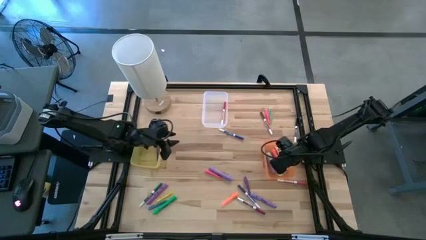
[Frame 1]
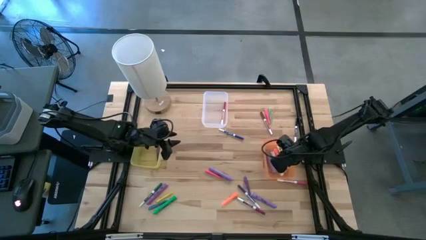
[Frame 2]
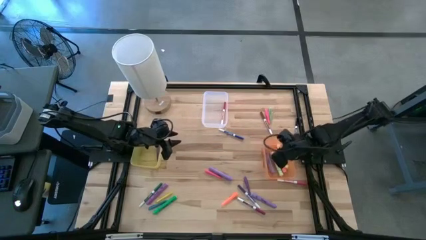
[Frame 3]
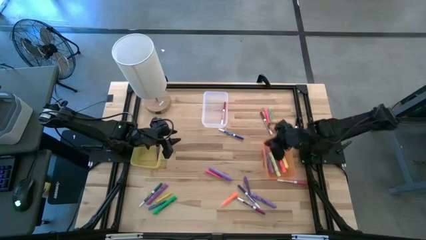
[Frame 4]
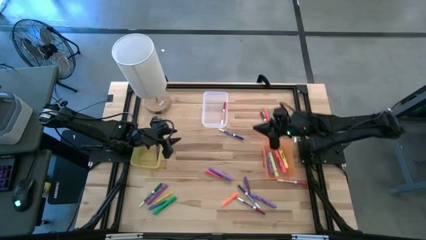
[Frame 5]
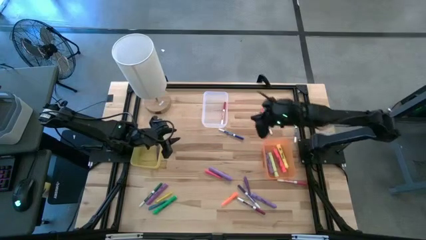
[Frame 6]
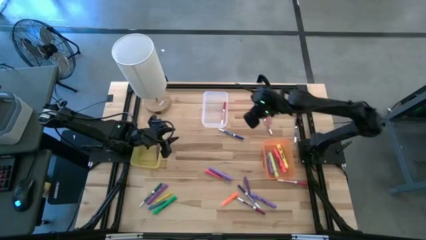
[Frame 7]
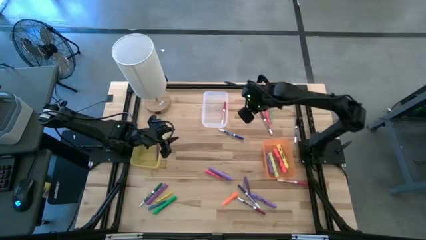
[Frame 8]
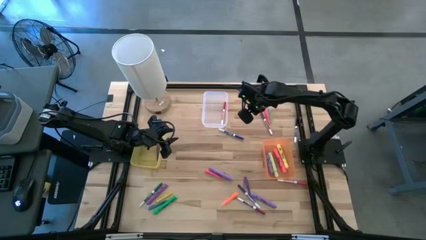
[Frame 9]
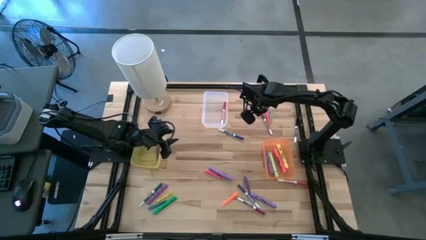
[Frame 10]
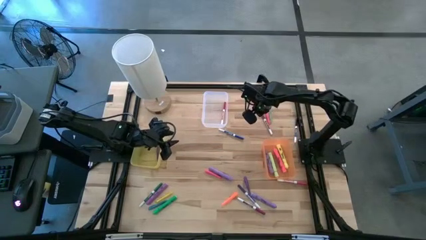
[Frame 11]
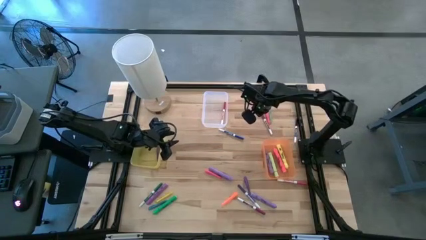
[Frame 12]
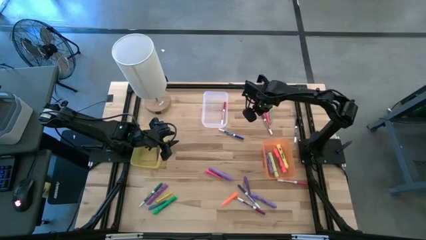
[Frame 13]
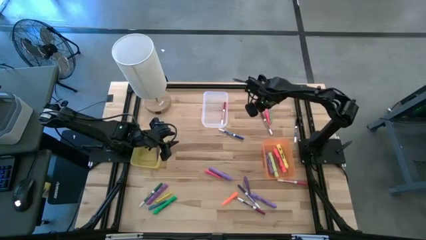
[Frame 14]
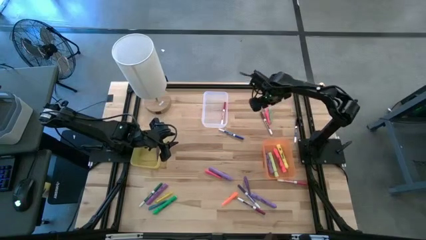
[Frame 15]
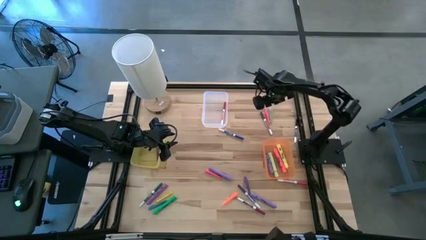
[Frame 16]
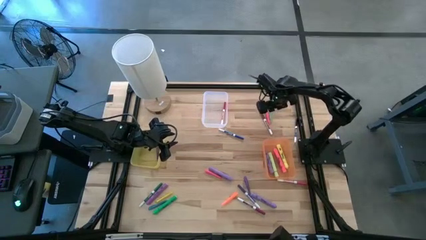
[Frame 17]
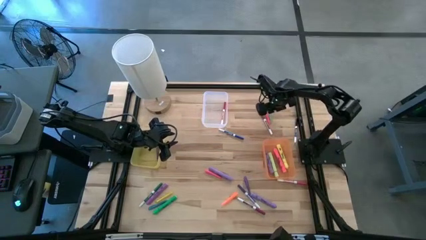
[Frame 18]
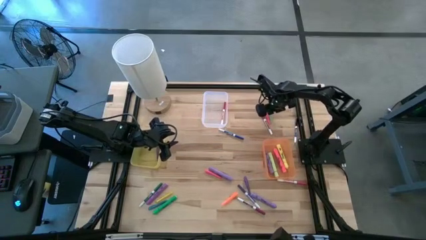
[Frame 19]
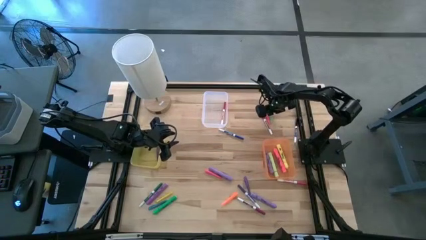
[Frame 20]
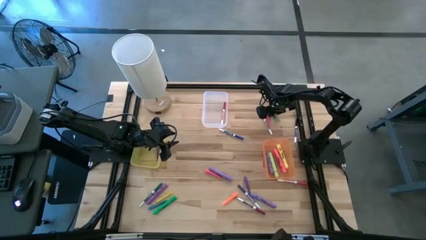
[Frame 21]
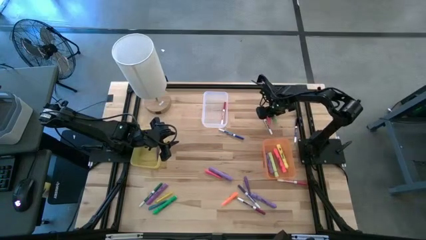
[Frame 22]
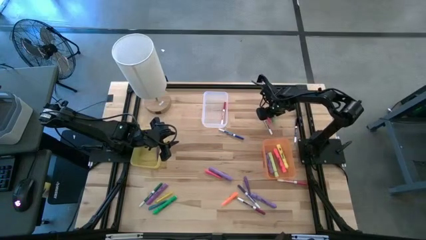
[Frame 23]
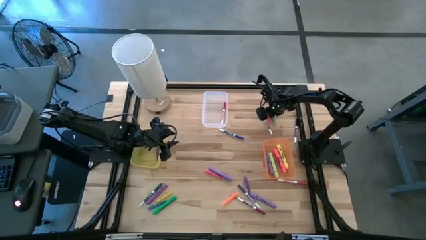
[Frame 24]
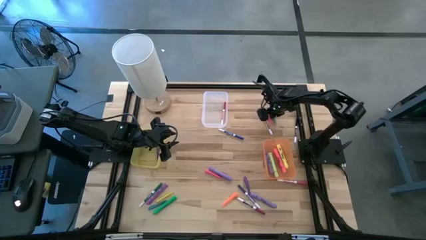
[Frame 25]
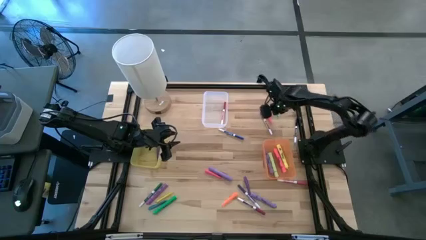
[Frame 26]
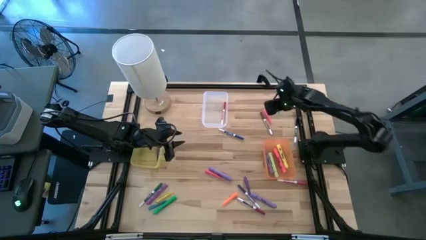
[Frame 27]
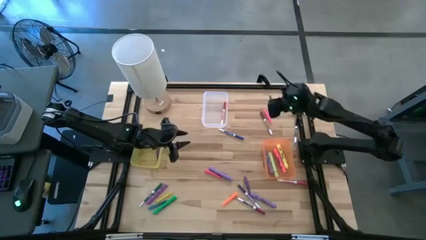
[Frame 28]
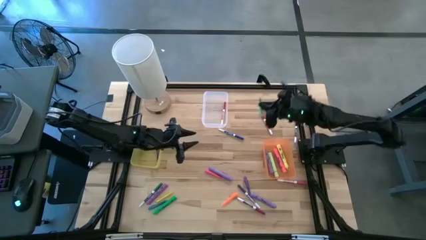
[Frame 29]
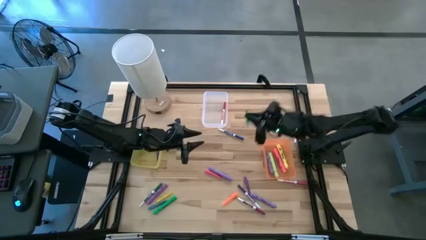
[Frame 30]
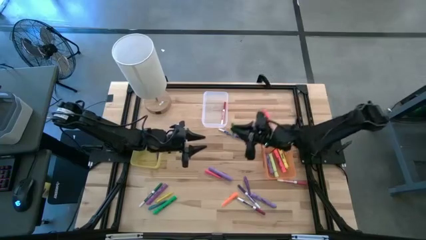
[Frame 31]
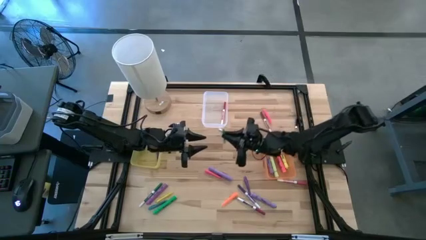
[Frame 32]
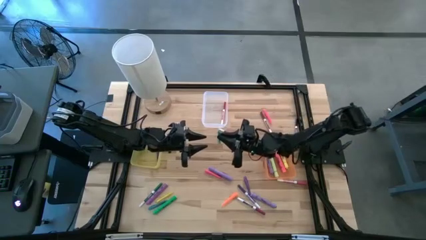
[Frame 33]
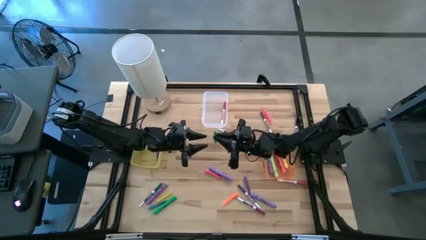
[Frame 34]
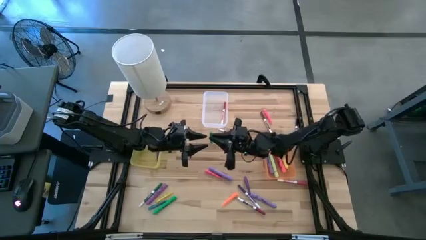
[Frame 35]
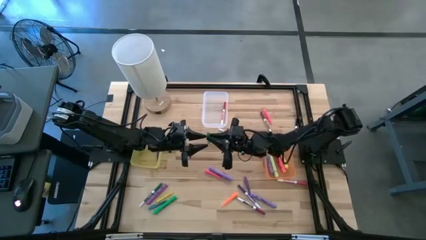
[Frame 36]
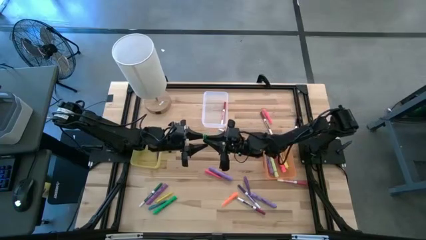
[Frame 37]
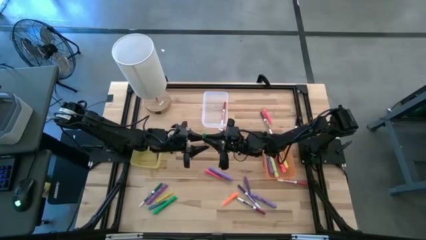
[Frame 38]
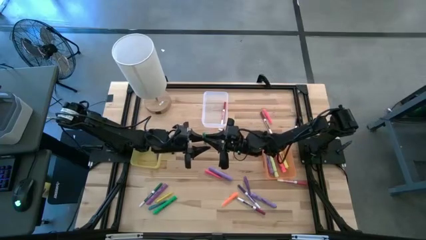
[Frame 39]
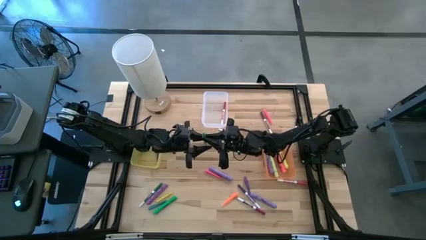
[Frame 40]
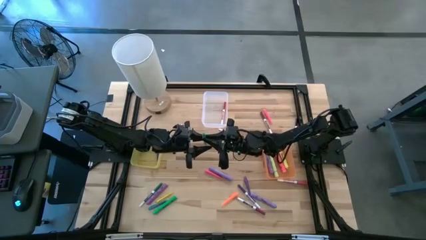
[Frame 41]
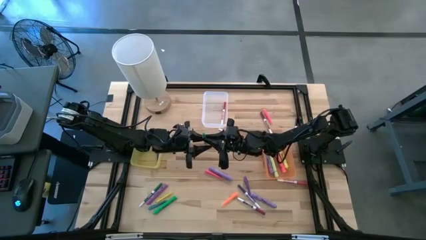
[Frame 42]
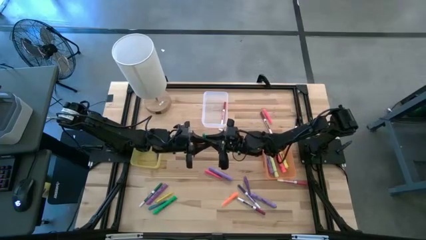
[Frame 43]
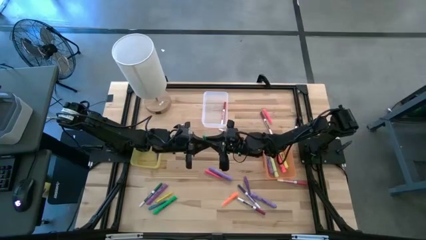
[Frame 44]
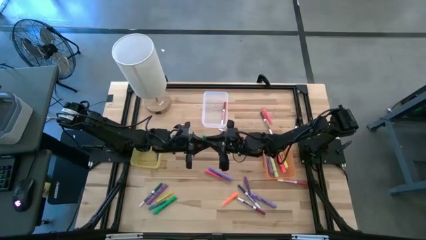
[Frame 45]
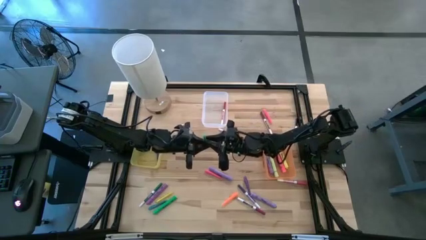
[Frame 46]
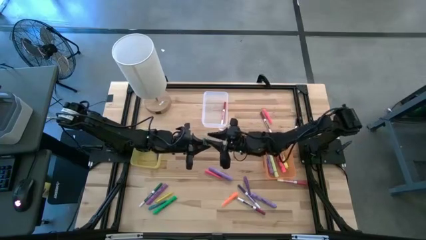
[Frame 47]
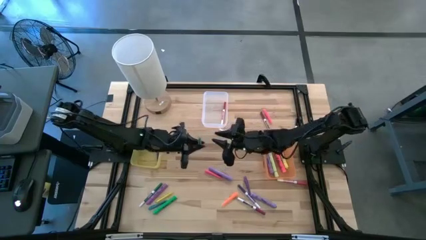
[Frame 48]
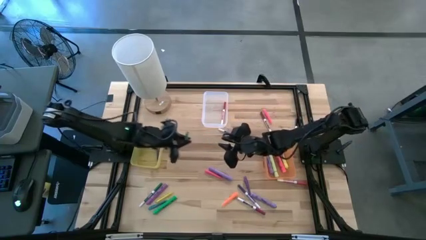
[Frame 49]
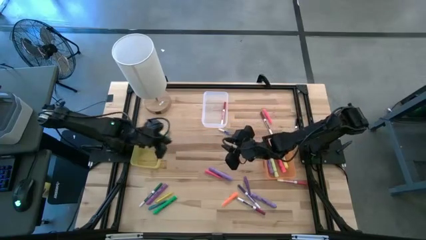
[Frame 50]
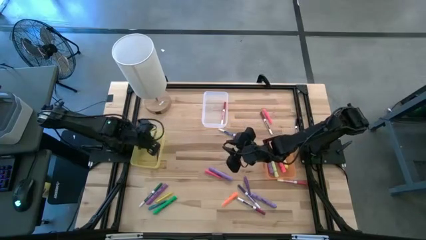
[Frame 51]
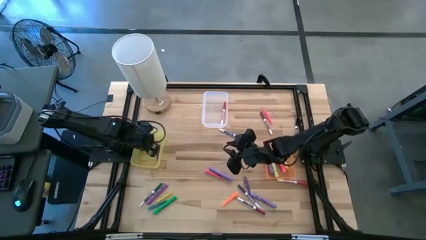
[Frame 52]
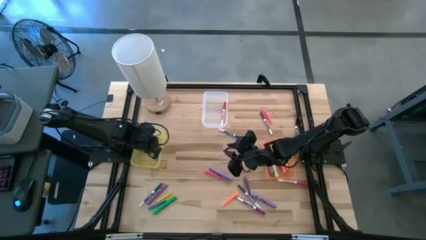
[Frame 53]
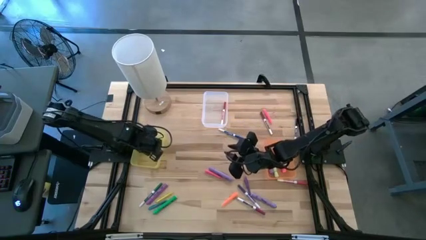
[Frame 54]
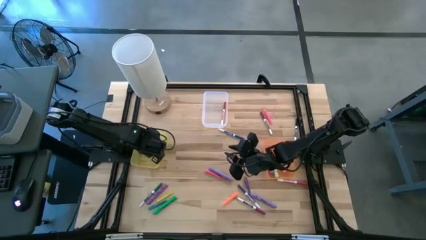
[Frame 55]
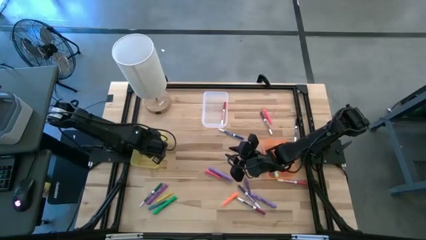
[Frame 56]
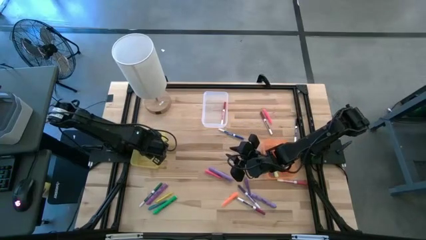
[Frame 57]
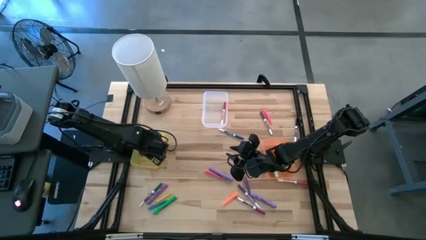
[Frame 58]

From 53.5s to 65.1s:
Task: Pick & Place Markers
Put the green pen into the yellow bin

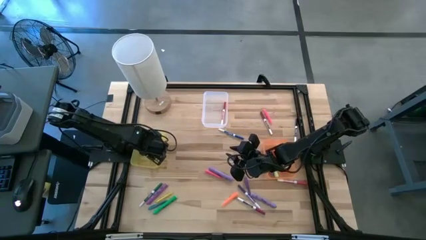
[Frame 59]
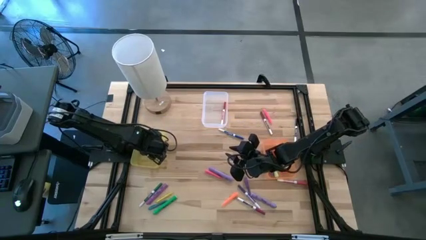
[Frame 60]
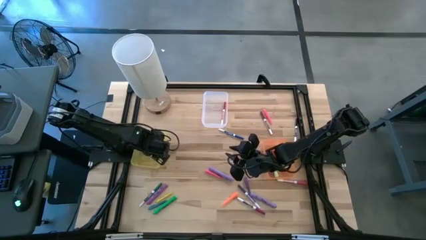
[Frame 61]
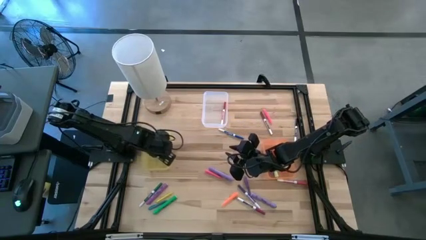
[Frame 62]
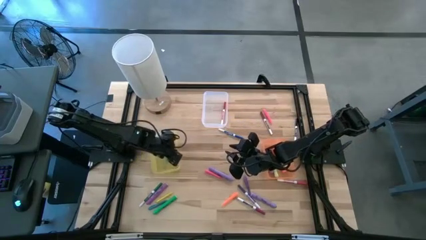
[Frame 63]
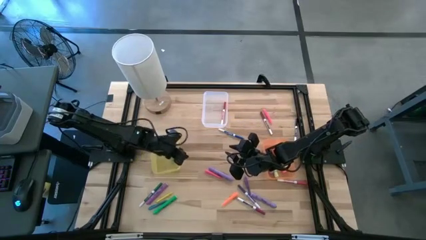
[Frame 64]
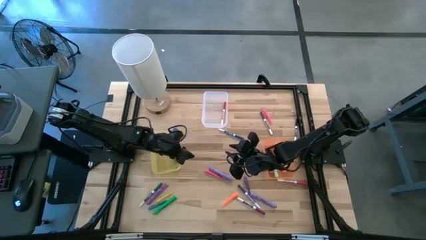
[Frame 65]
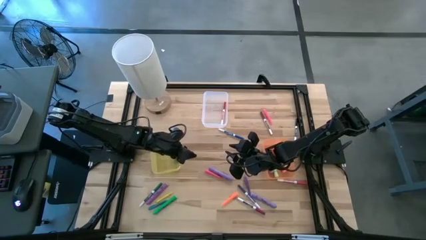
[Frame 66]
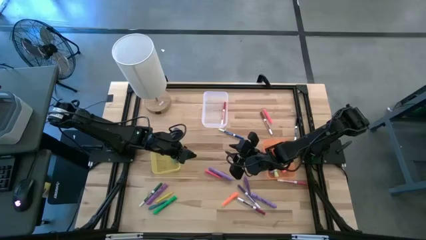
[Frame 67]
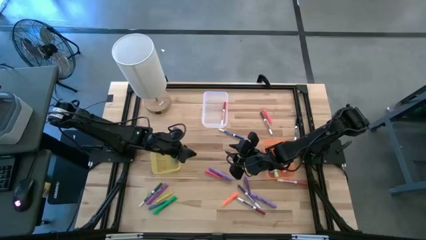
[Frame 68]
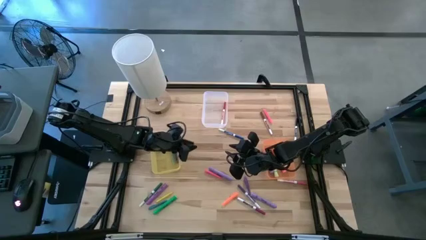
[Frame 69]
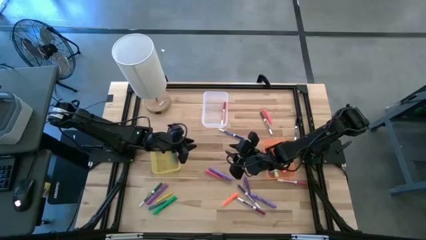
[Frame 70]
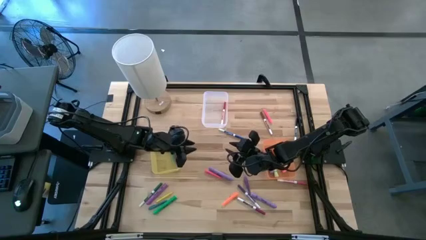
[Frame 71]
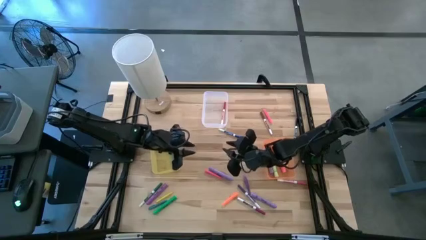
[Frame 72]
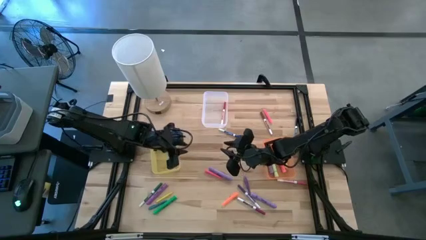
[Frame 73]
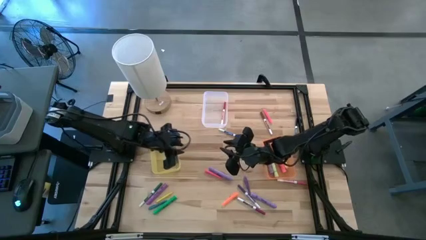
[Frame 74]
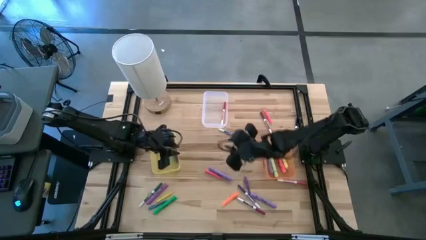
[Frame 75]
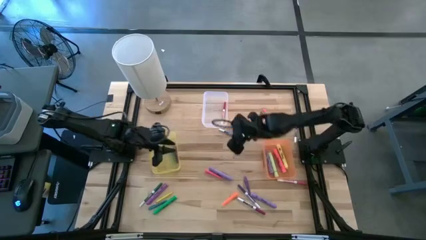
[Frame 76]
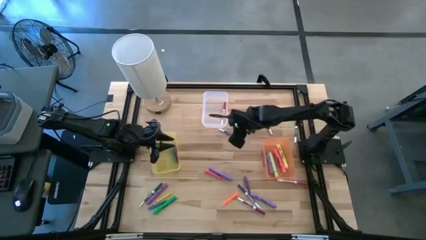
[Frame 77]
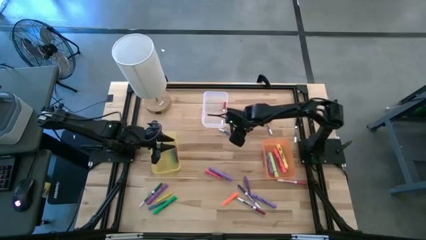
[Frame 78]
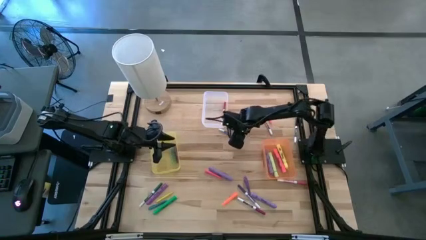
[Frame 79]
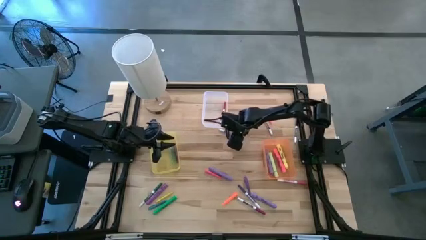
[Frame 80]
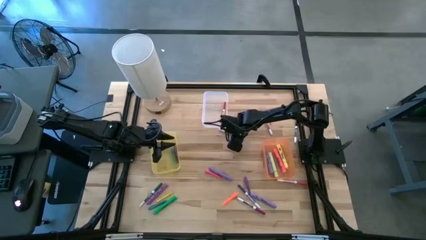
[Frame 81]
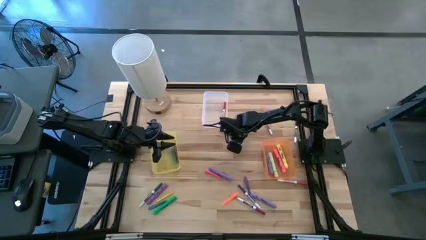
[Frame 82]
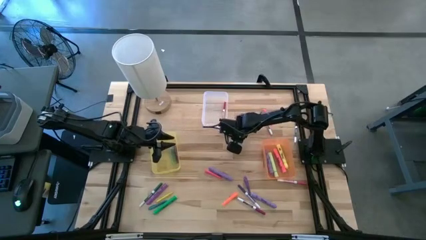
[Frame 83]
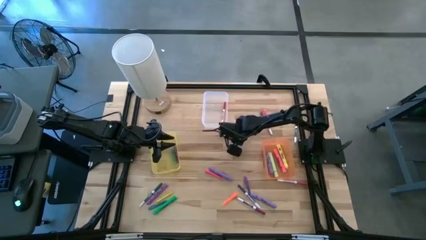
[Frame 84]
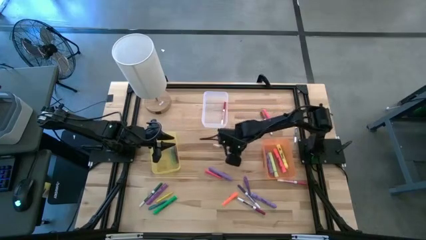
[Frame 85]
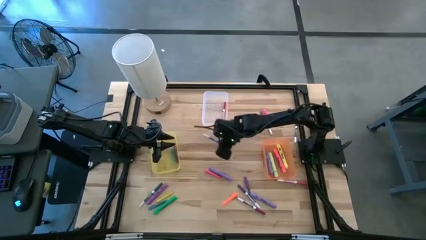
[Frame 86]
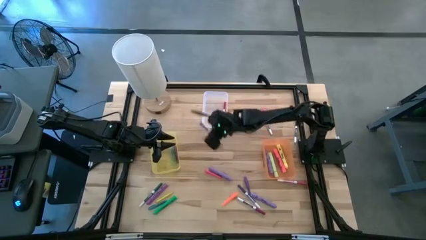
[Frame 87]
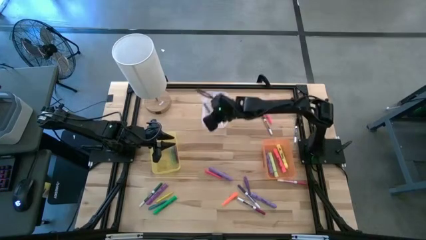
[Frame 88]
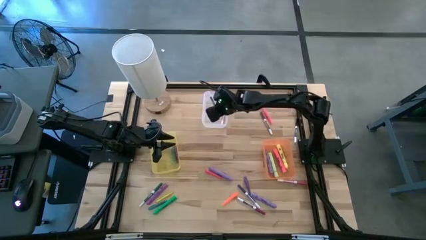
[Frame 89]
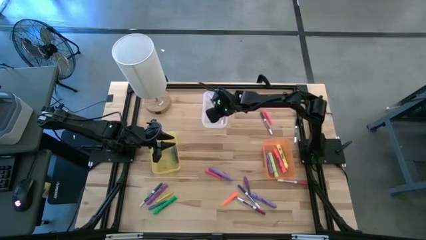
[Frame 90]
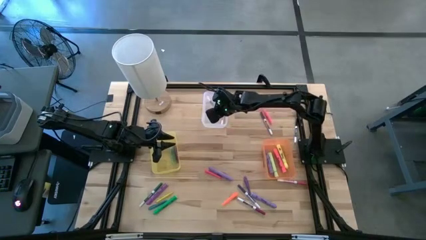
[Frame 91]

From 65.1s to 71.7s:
Put the blue marker pen into the transparent bin
